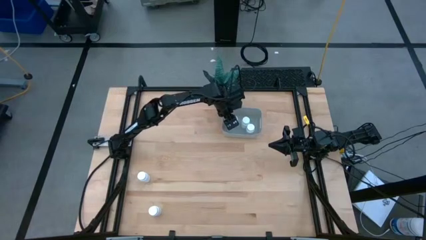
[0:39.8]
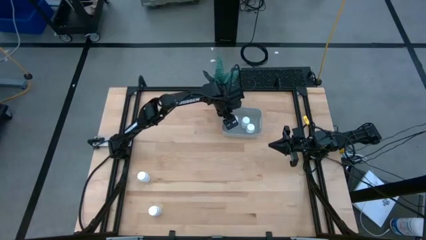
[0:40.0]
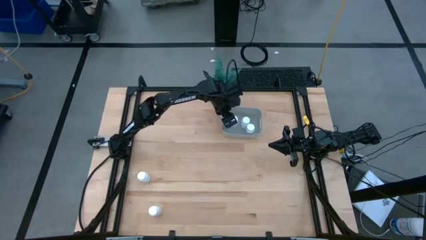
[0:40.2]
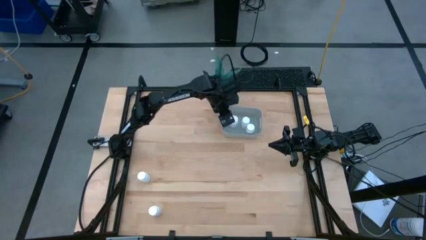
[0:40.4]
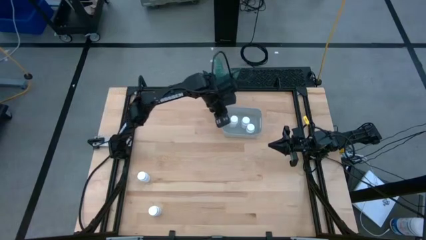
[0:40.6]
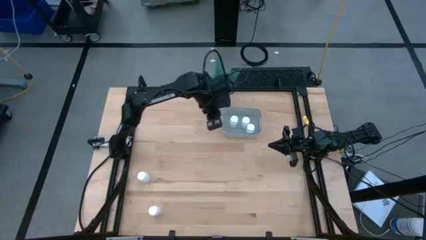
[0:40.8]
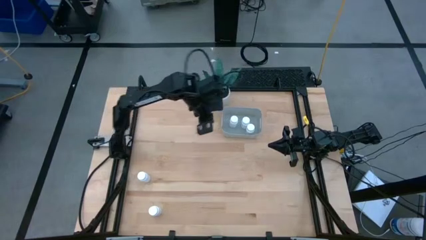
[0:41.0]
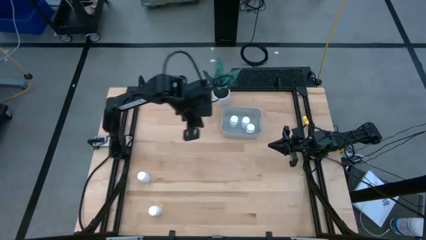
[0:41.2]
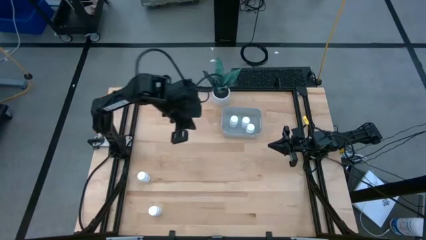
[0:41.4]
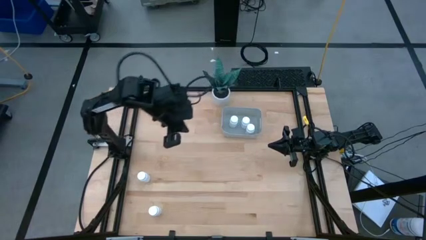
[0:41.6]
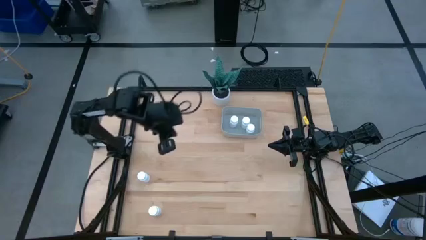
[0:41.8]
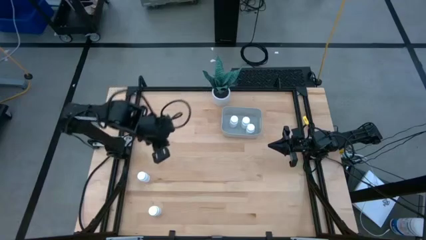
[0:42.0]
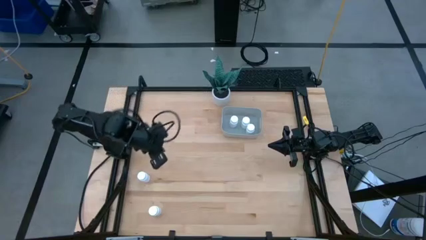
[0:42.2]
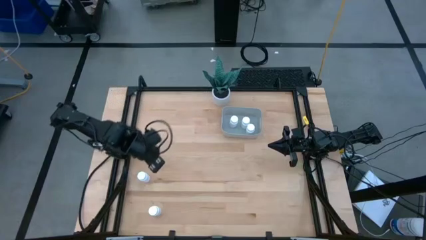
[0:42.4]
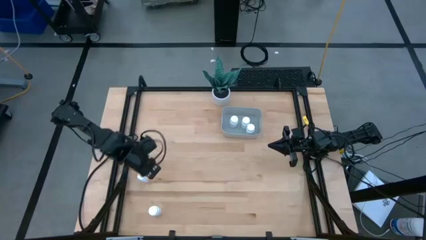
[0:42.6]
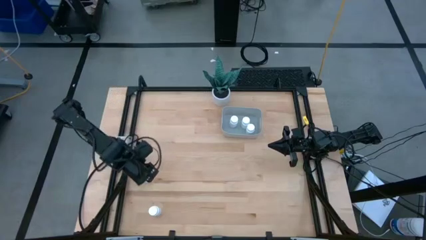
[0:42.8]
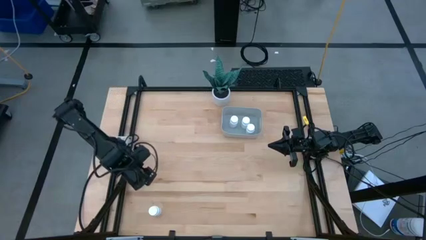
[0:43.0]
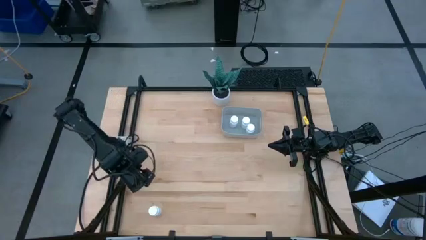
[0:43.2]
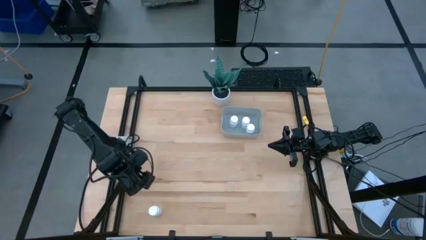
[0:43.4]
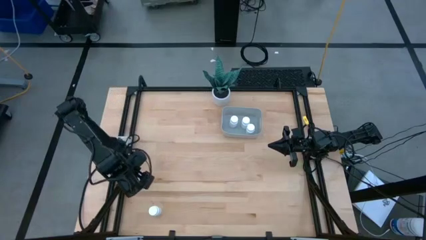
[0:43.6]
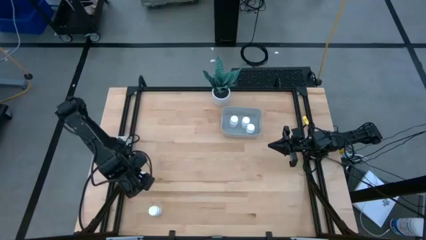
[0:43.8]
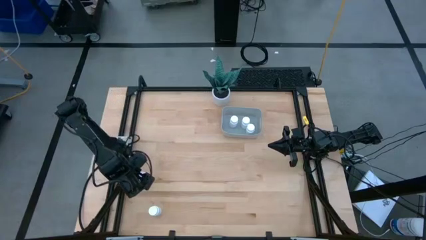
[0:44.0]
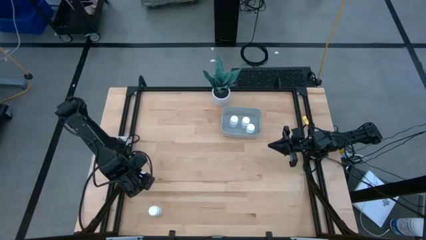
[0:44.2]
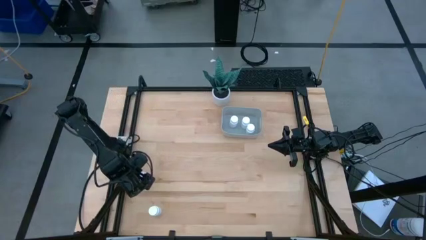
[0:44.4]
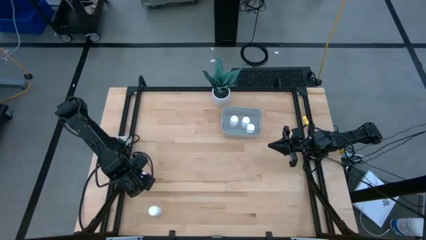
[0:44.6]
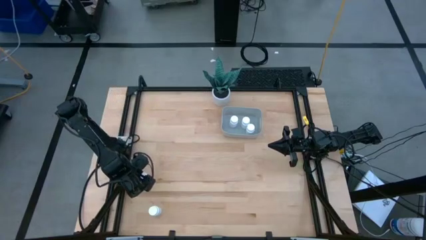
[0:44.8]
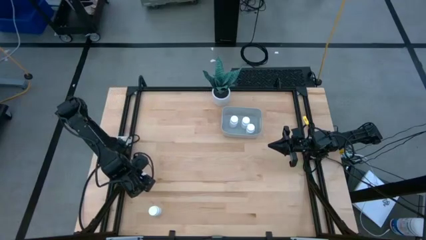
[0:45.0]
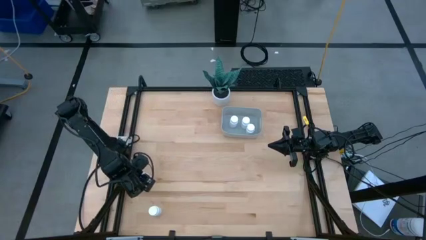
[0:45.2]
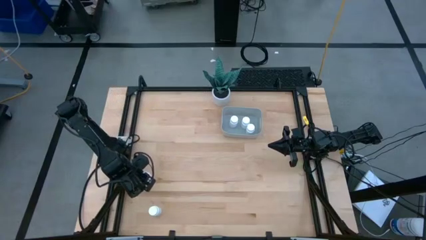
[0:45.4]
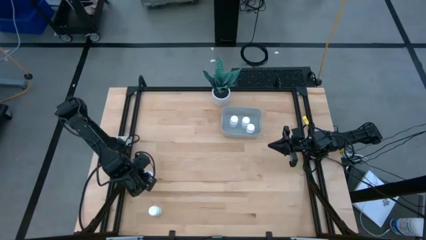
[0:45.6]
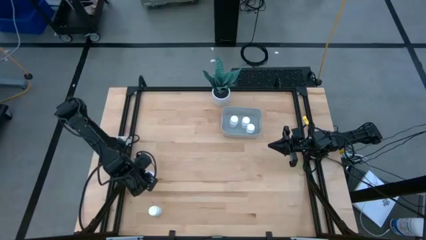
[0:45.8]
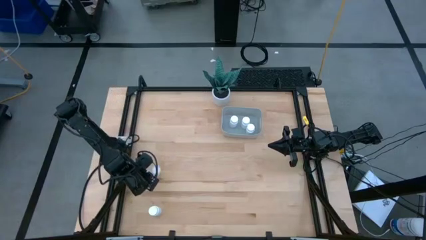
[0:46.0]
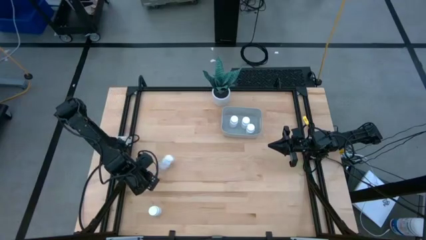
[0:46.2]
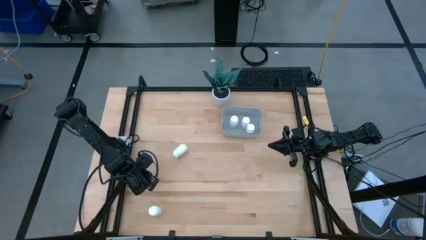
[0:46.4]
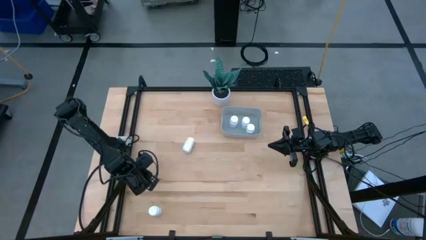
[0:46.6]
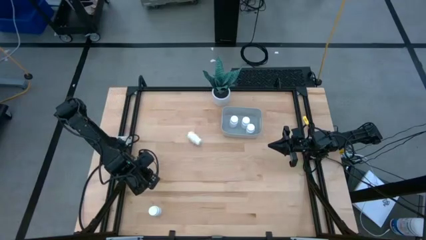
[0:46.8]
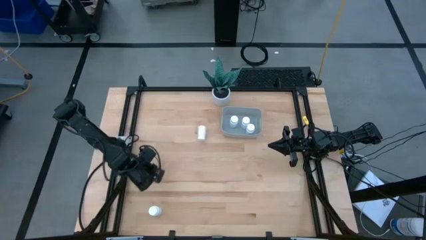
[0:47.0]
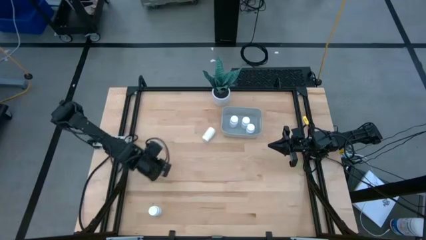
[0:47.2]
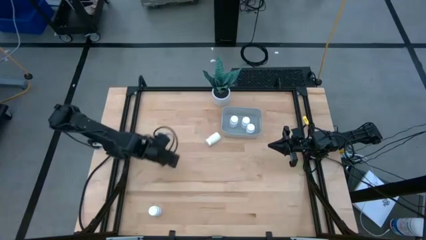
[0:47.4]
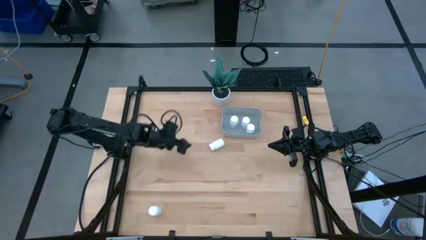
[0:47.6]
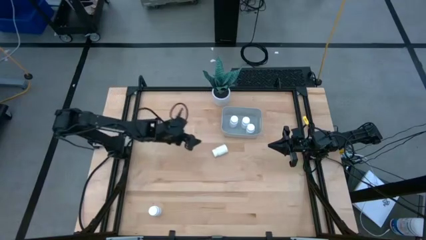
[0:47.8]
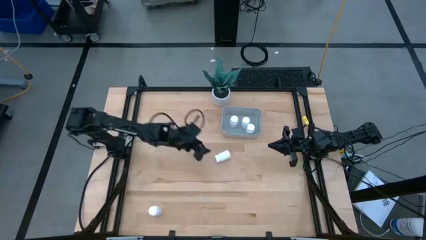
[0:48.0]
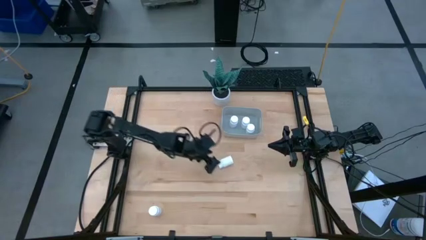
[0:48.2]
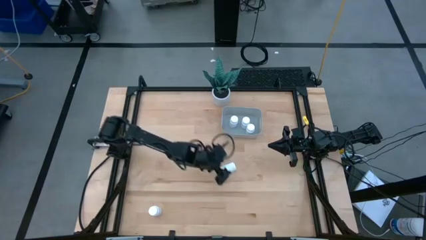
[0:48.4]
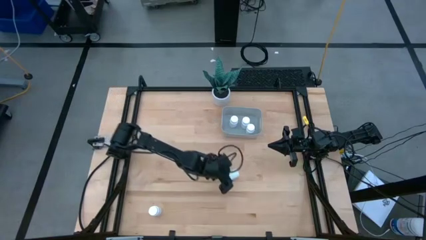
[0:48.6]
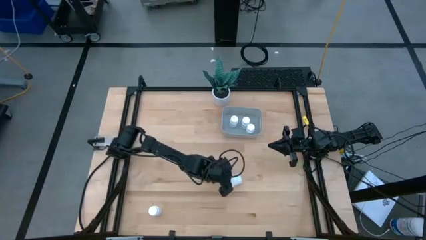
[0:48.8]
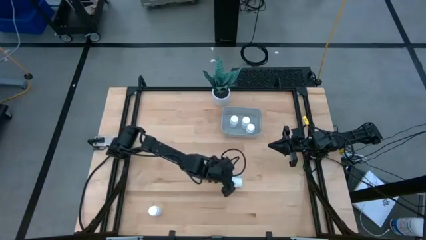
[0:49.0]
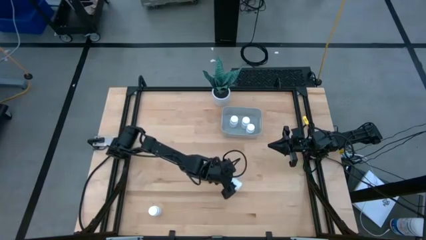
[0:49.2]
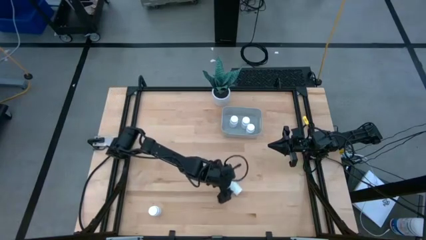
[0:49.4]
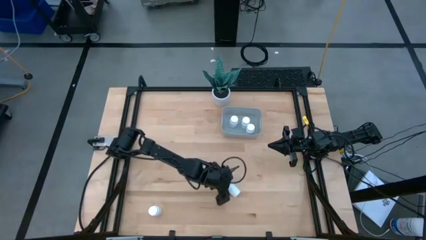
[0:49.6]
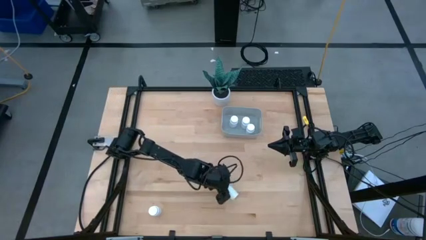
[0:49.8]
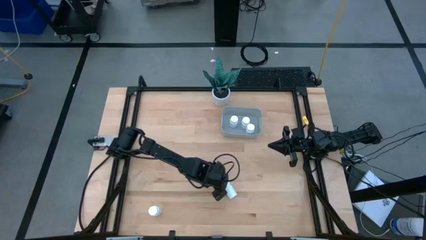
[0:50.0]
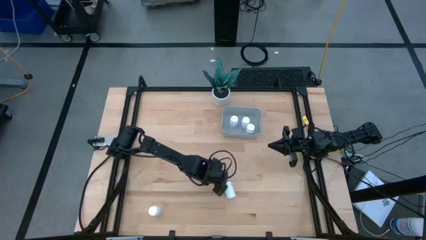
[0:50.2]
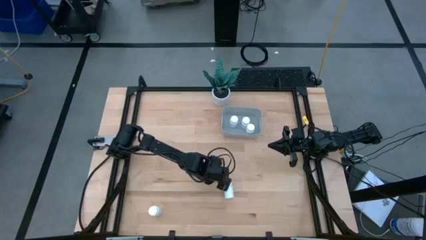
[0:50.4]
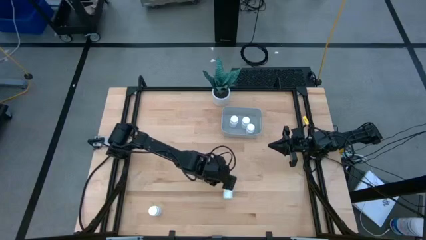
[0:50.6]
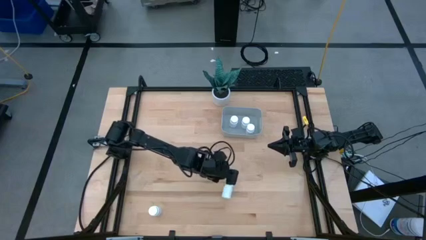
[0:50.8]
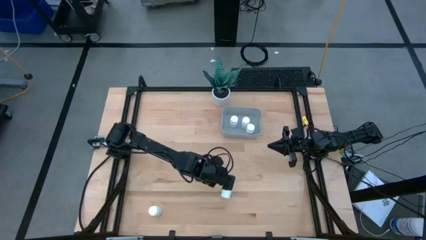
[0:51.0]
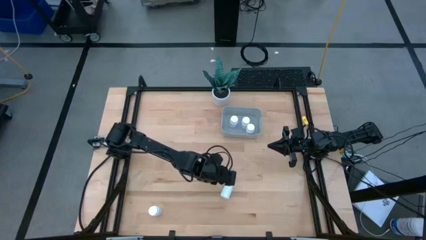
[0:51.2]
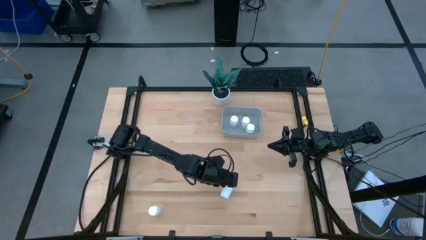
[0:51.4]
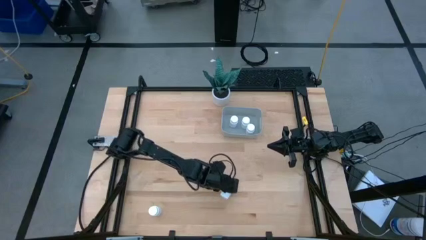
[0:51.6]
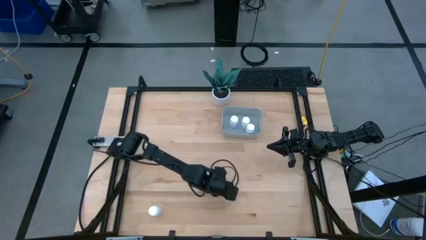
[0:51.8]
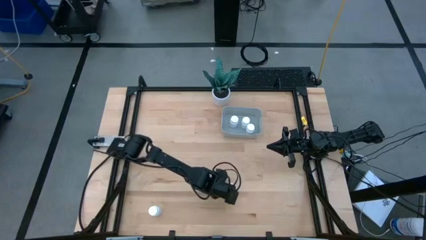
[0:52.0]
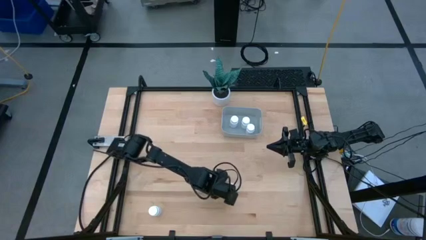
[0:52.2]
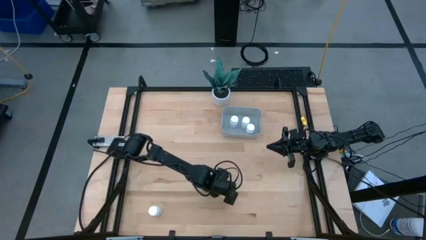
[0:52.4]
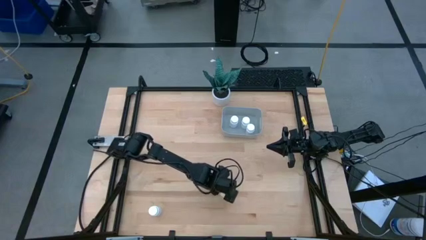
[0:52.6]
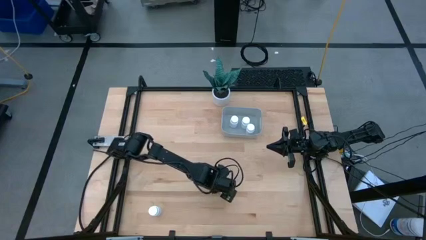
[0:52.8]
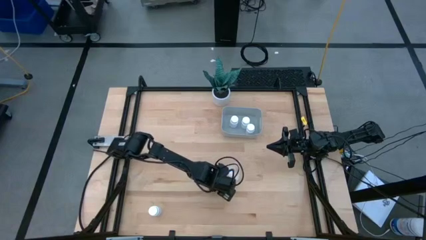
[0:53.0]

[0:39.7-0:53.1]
Task: Pick and place pill bottles into a basket
Put the white pill bottle into the gray bin

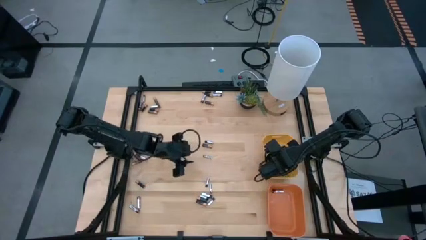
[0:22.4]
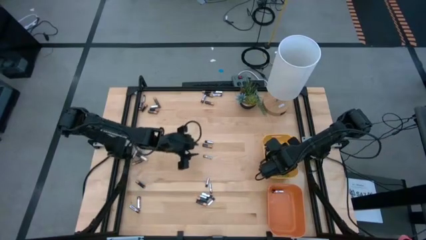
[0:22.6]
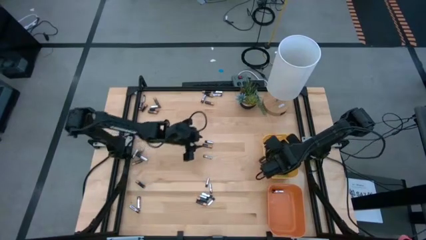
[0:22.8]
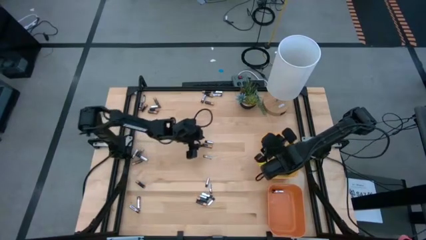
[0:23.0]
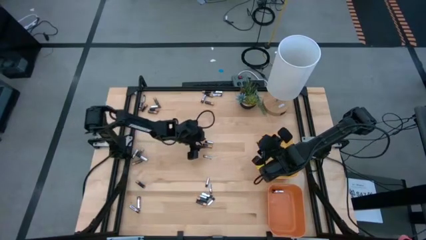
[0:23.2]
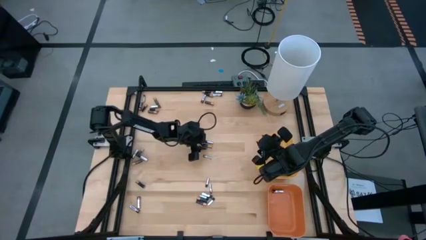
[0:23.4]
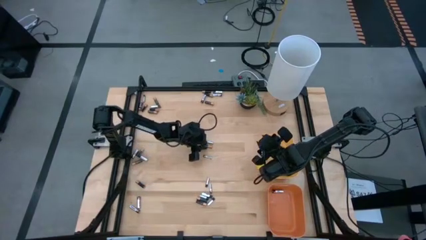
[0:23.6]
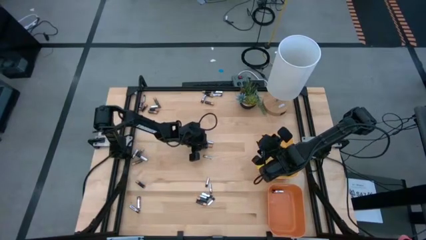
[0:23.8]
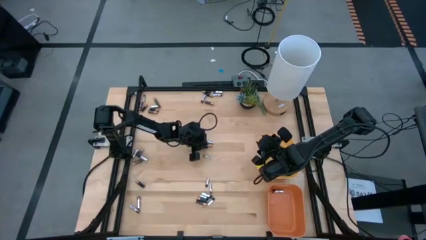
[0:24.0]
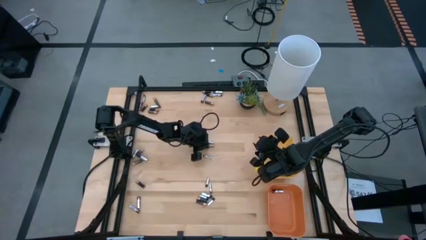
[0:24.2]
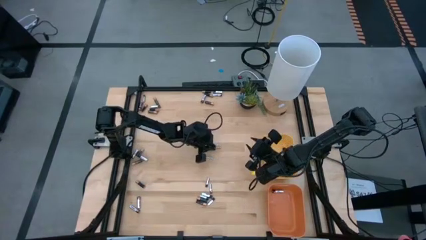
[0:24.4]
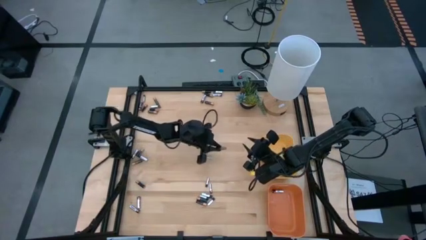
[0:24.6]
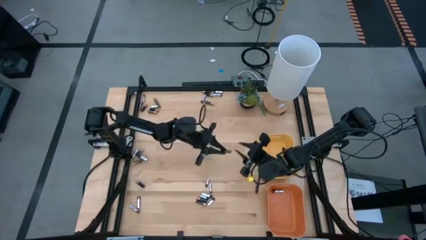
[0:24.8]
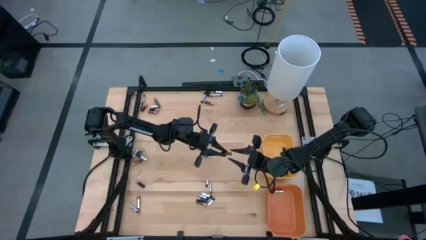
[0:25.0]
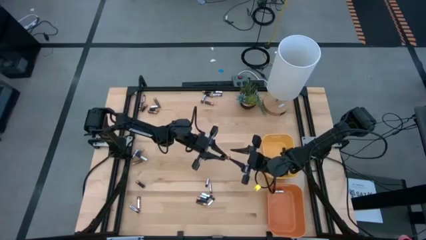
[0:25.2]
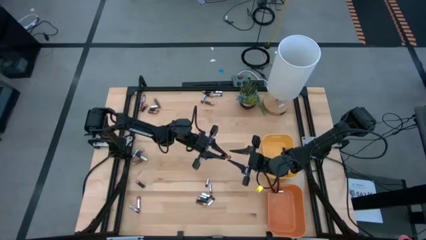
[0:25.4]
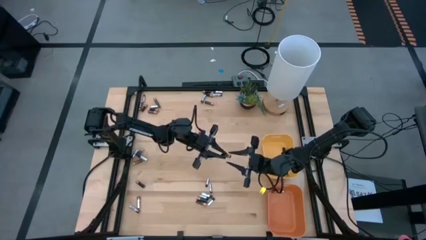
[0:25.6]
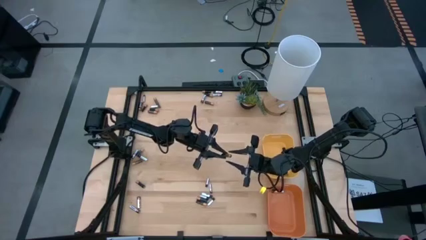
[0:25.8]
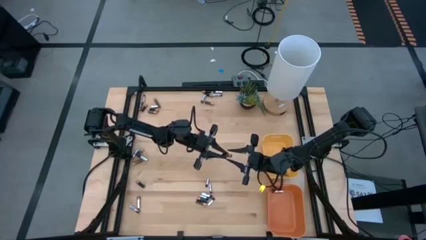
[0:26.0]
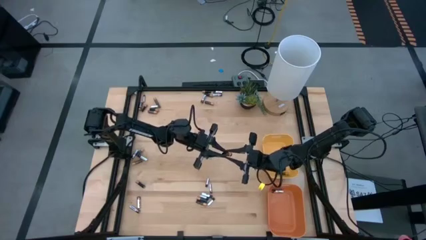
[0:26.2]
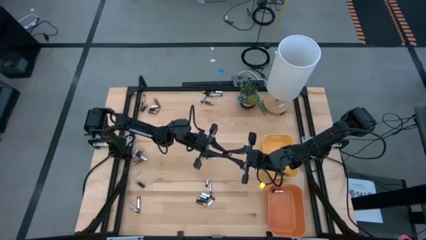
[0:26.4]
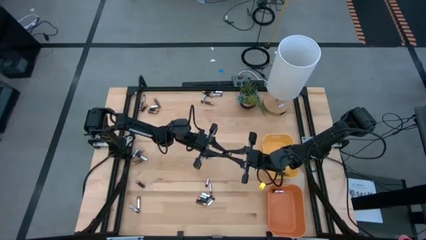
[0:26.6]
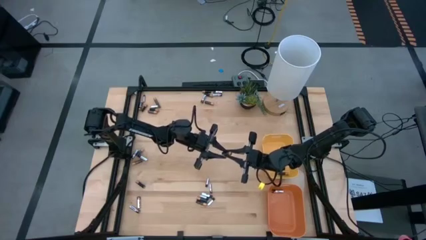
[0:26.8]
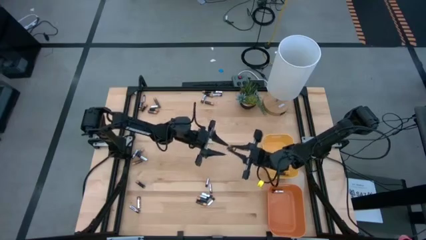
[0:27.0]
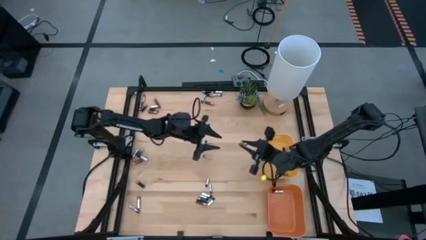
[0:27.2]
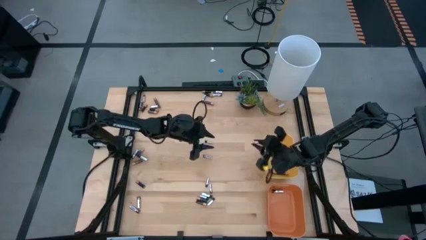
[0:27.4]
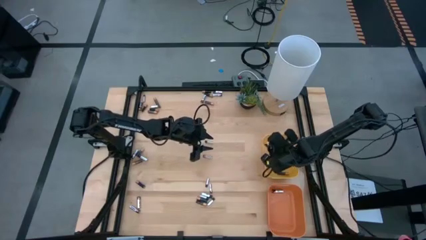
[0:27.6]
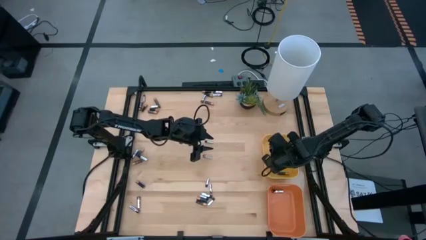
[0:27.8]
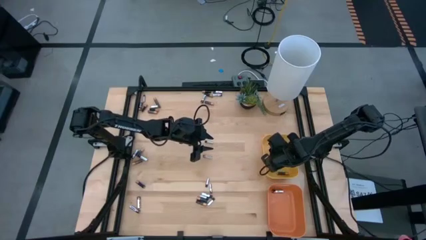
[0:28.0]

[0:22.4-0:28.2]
Task: Sort batteries
Put the brown battery into the yellow bin
